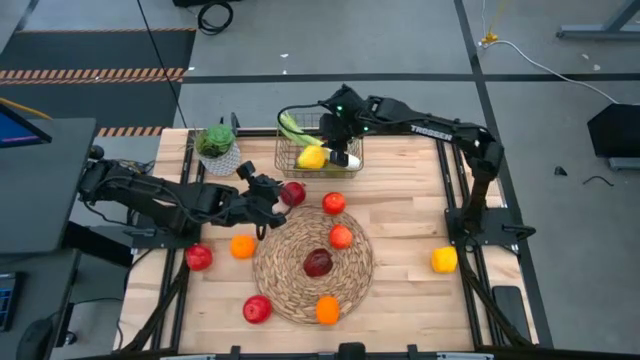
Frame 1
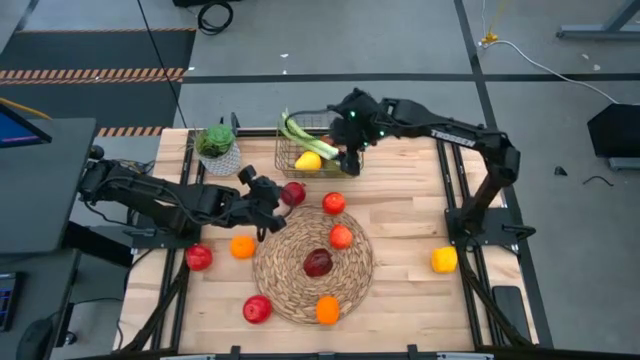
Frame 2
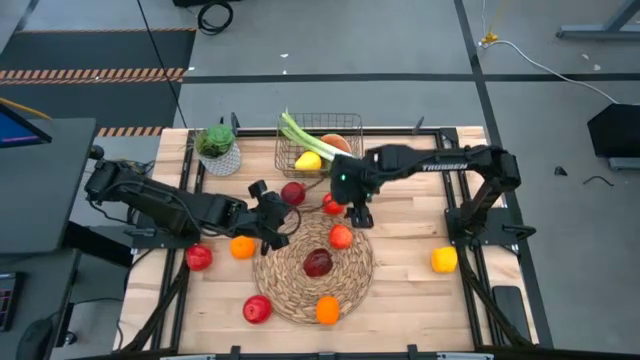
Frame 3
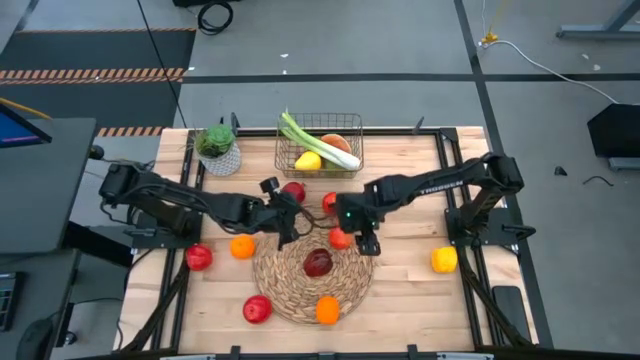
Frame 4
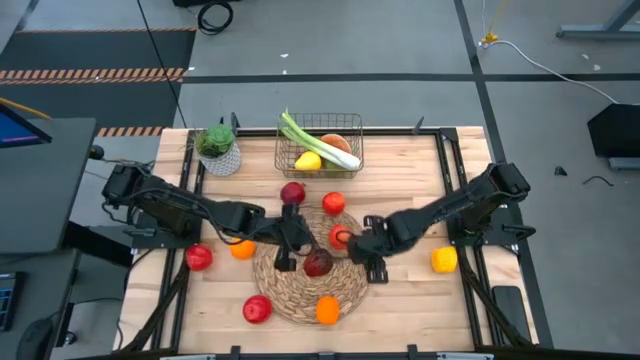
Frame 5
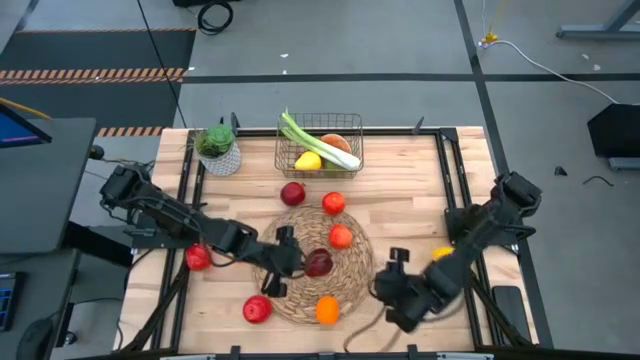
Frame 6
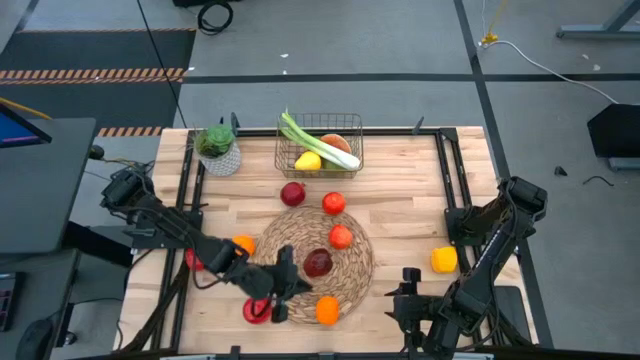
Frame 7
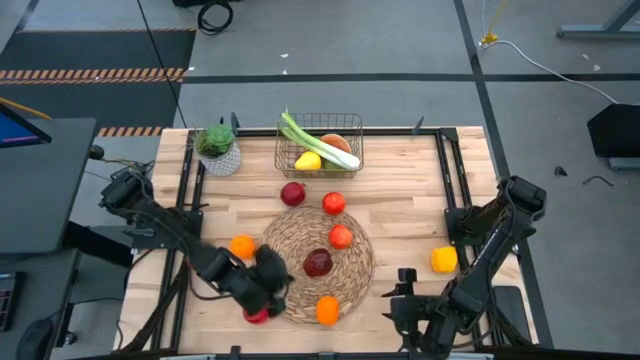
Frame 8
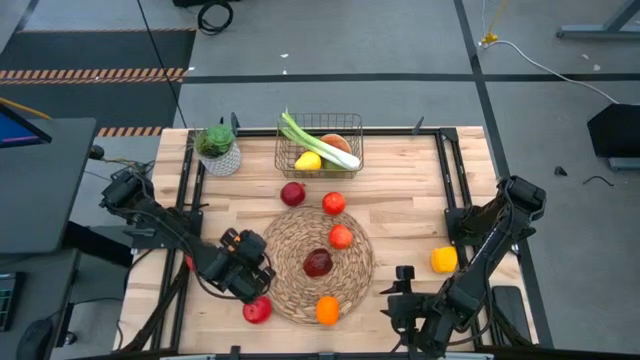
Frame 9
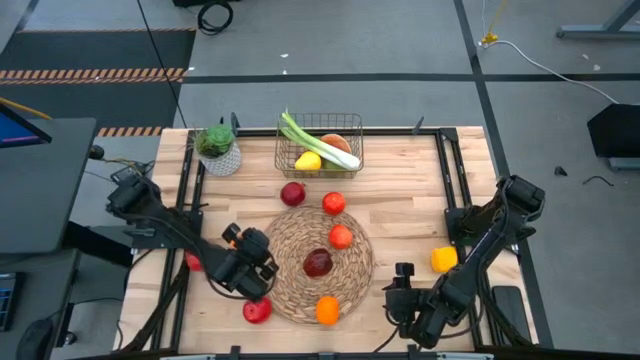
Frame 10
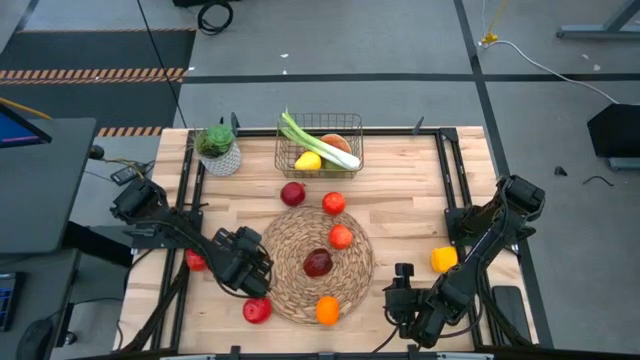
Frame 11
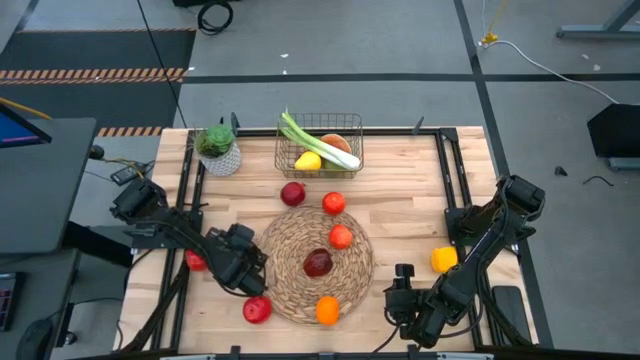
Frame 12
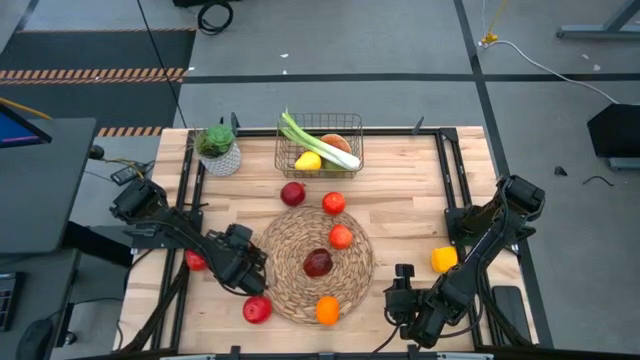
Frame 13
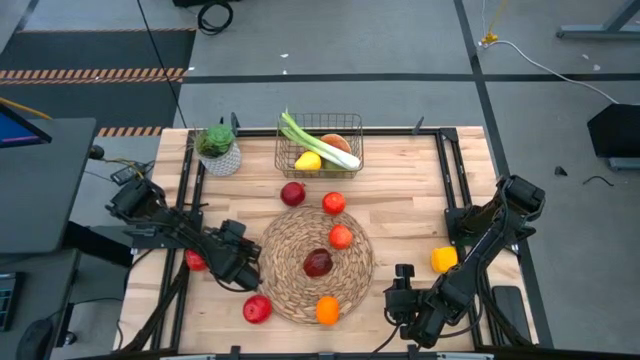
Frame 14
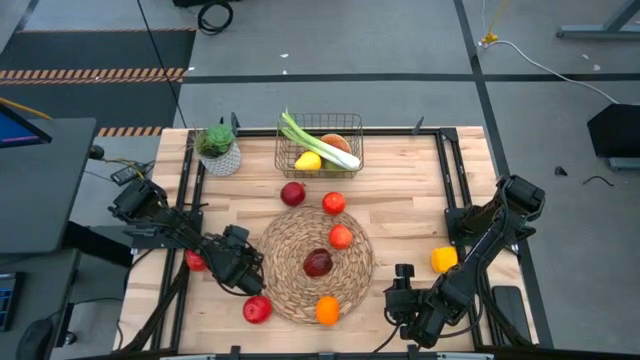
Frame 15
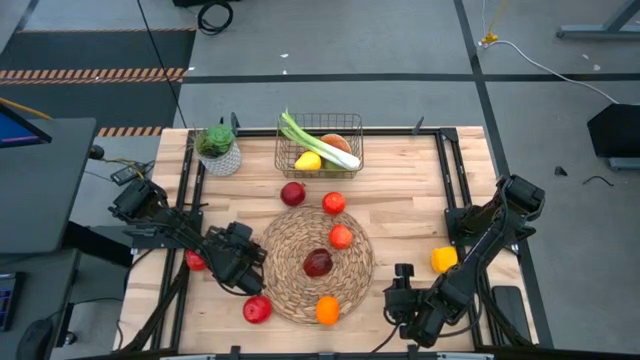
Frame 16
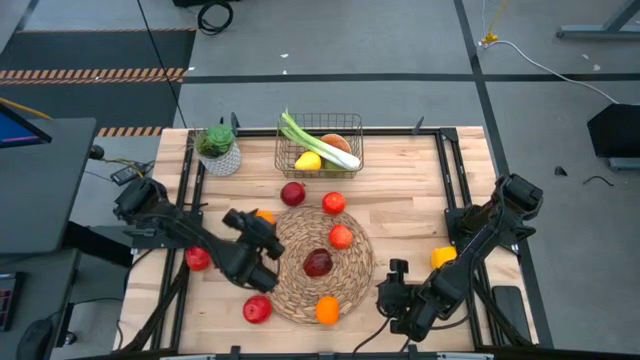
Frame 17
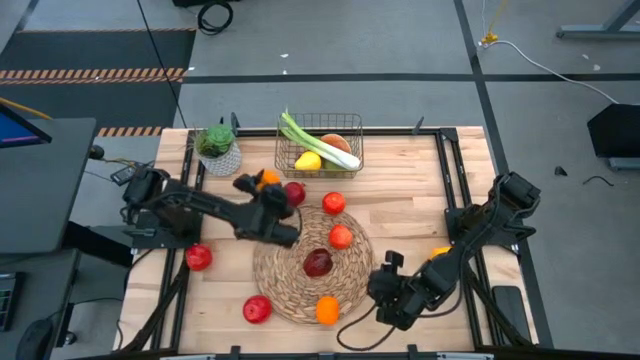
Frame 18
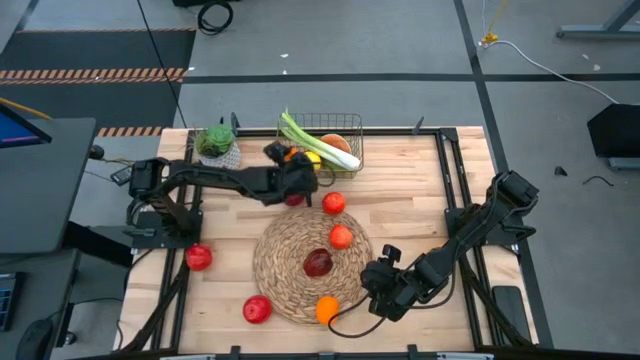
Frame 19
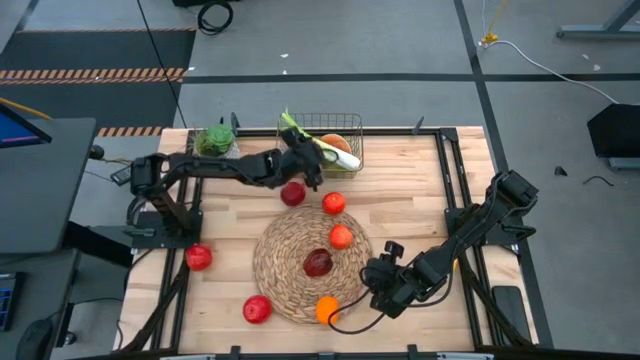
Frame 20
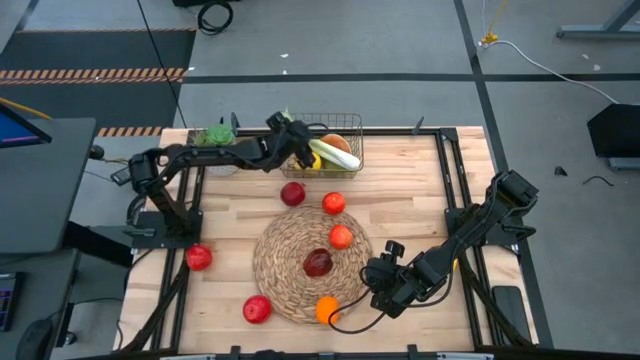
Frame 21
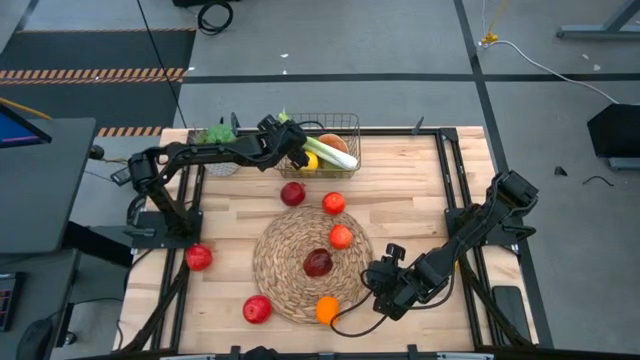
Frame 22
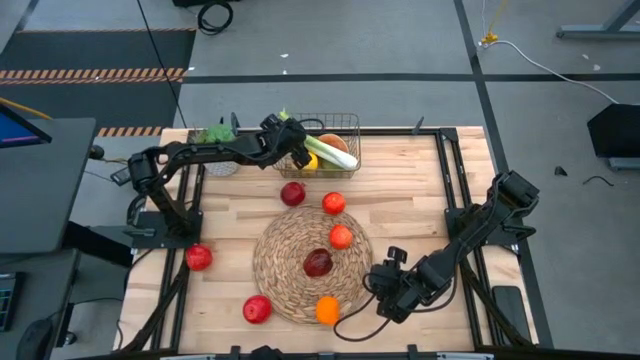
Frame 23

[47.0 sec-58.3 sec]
Task: Build produce basket
Put the orange into the wire basket

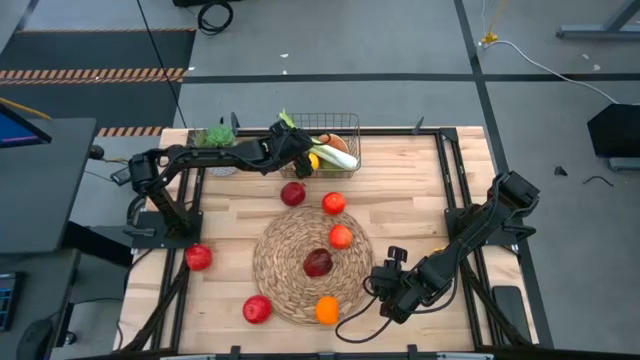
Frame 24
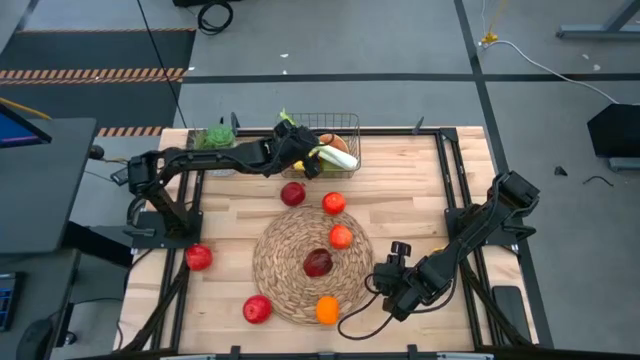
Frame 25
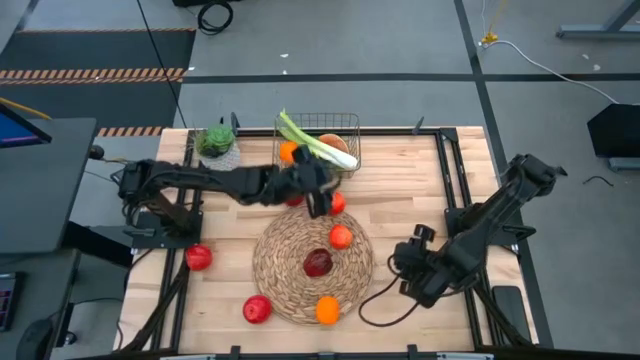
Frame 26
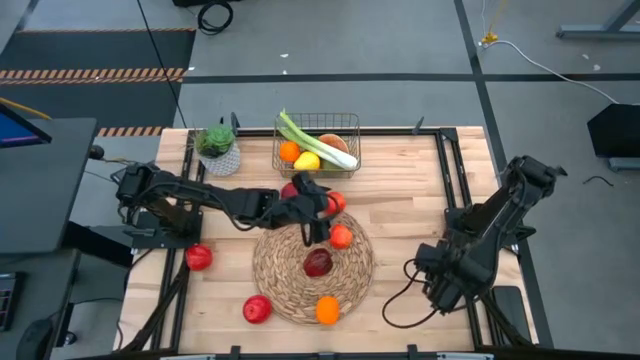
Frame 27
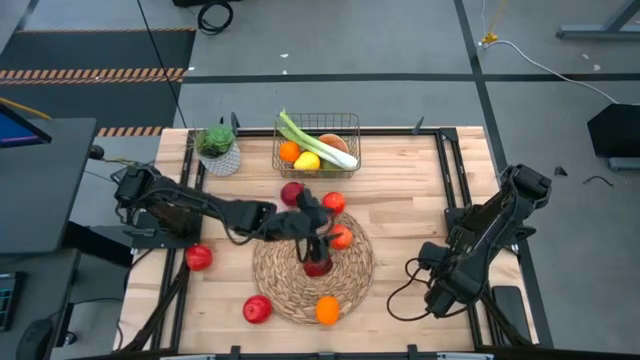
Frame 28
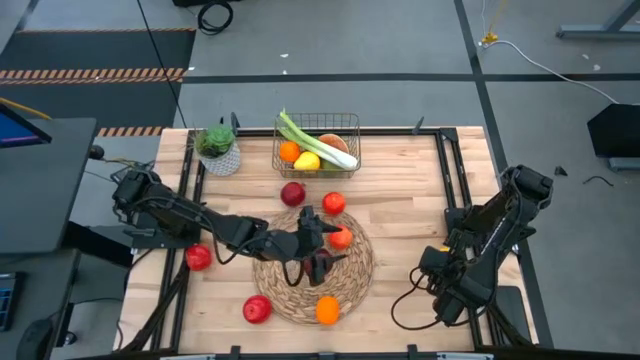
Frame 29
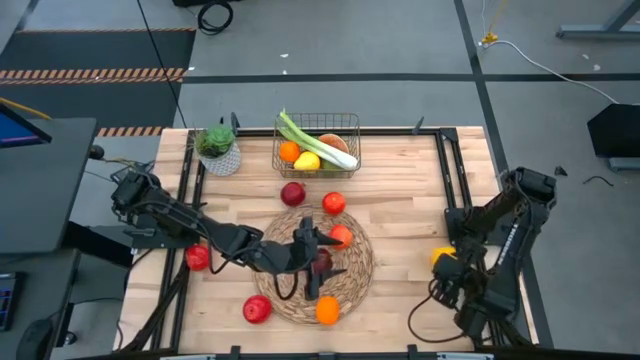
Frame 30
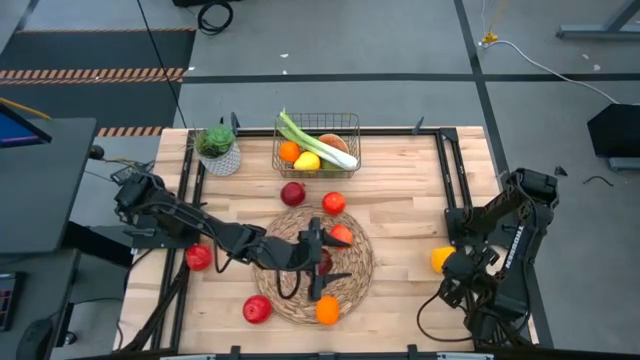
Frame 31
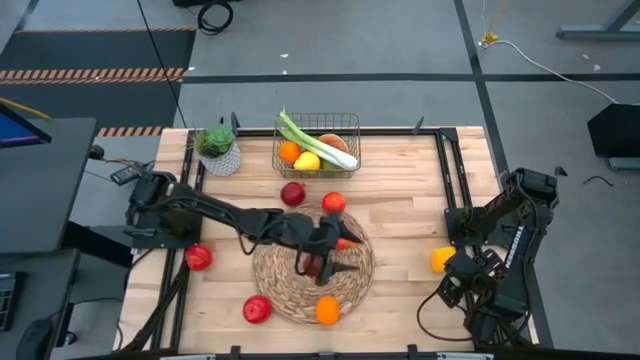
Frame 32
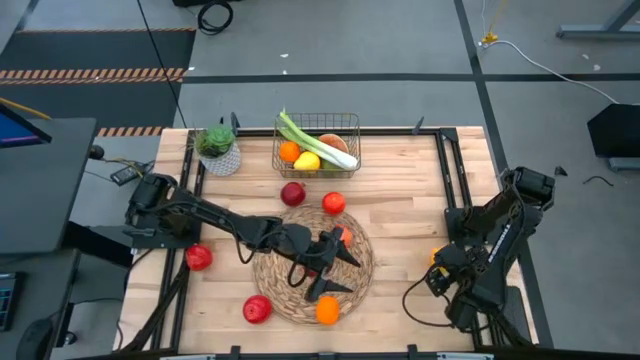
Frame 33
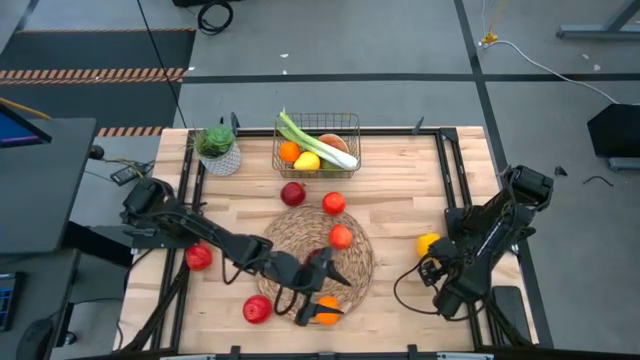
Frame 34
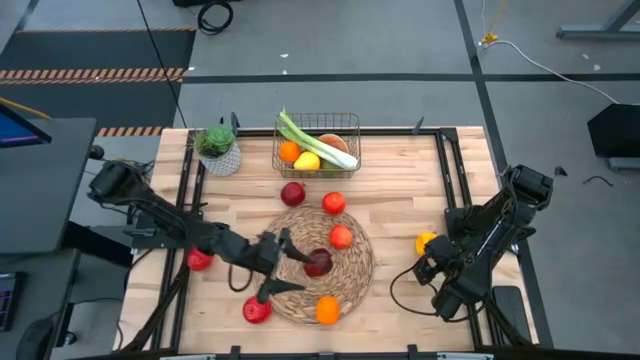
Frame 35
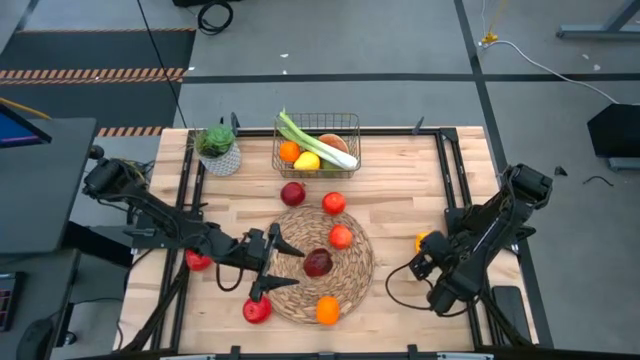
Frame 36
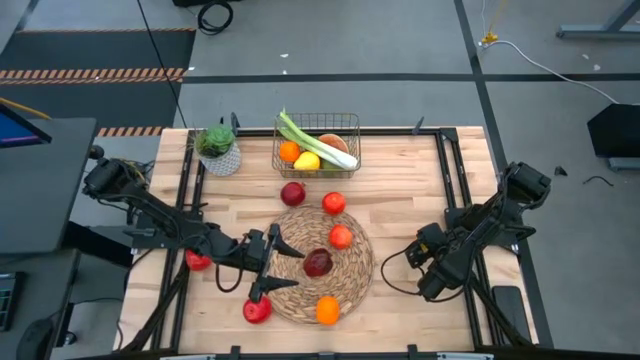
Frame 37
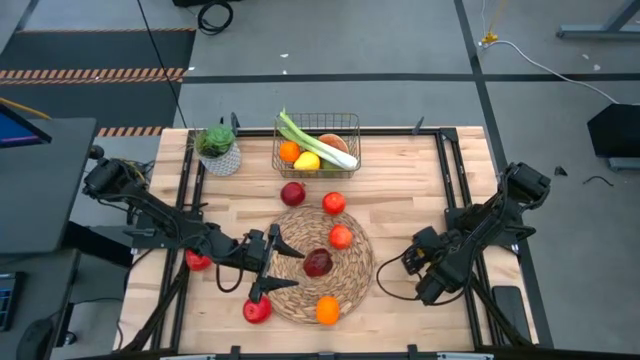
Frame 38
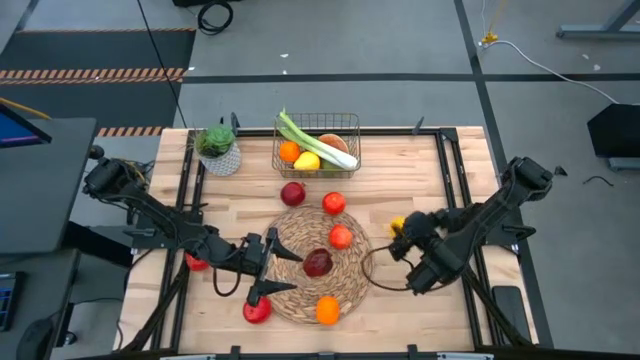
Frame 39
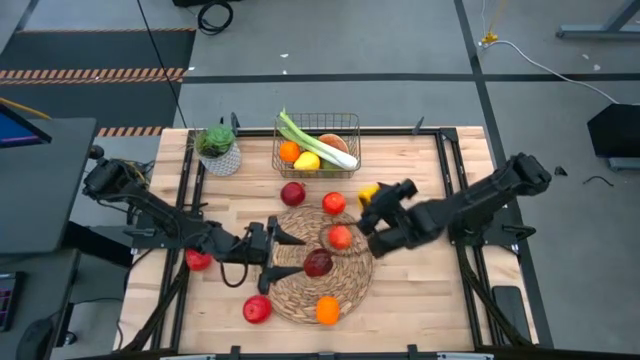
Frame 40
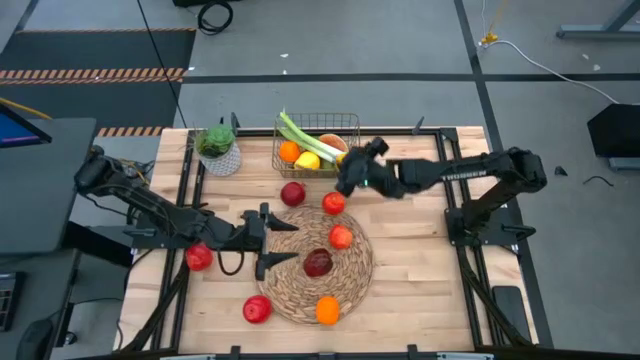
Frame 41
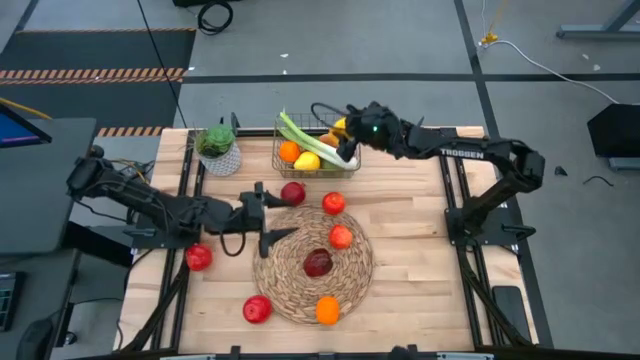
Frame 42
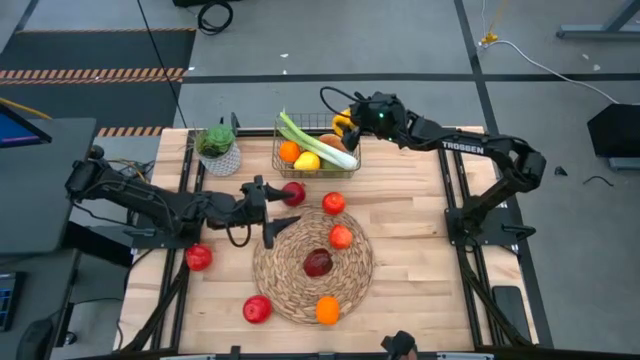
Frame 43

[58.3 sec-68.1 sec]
Put the yellow bell pepper into the wire basket
